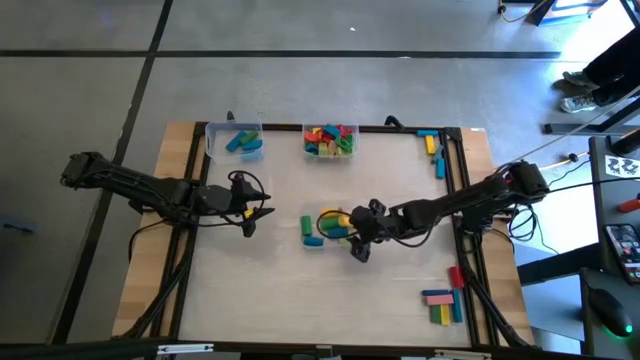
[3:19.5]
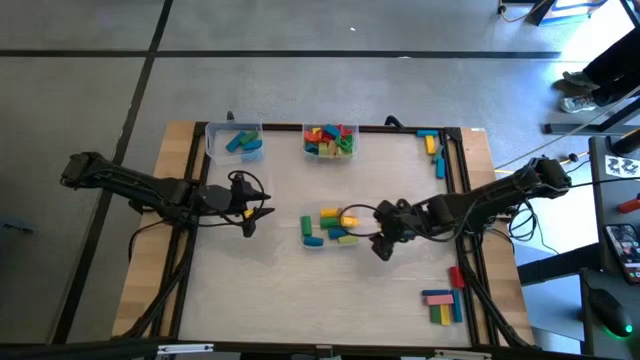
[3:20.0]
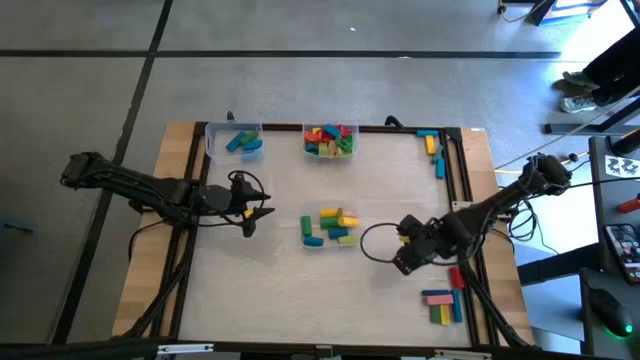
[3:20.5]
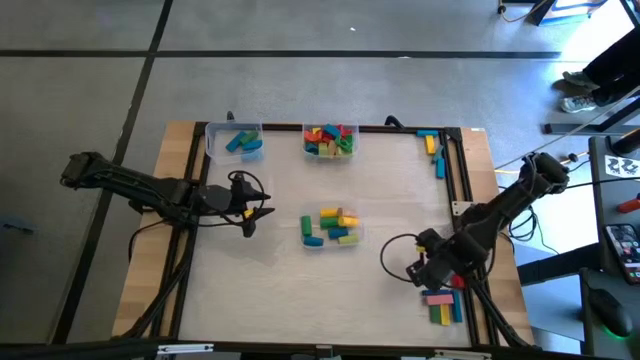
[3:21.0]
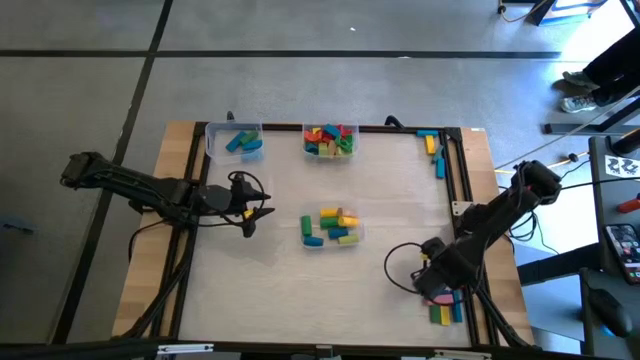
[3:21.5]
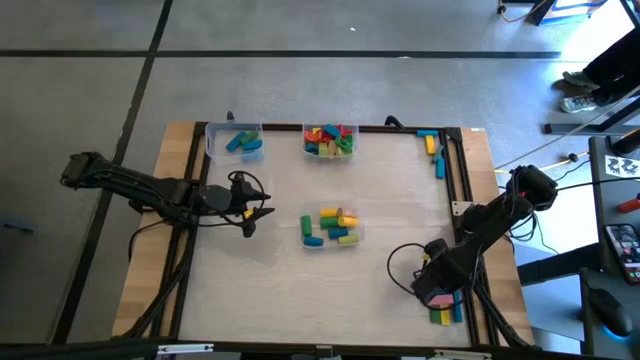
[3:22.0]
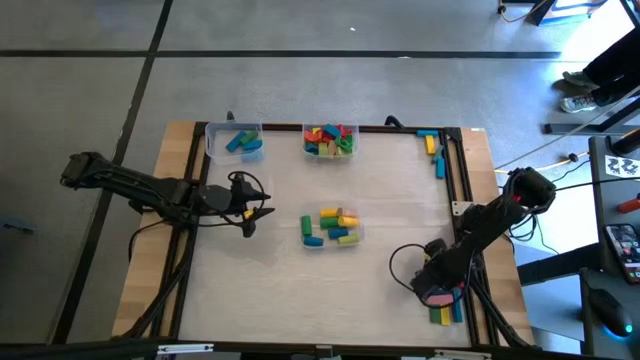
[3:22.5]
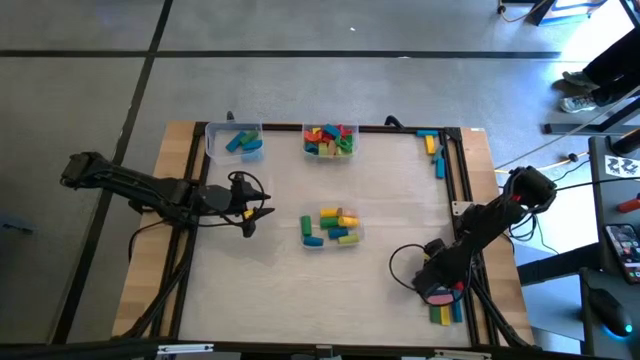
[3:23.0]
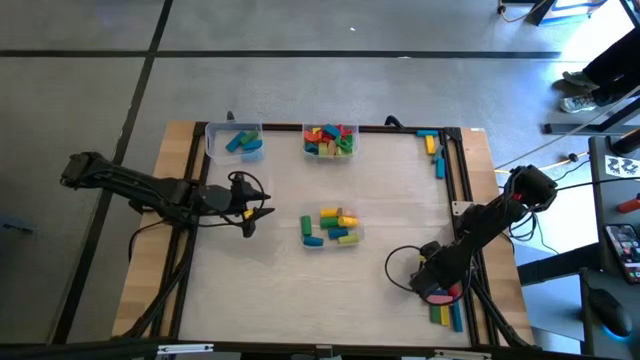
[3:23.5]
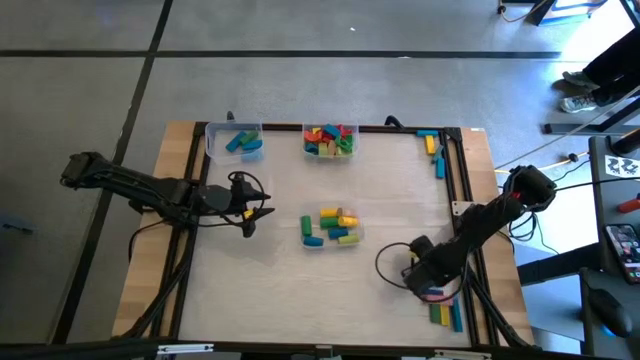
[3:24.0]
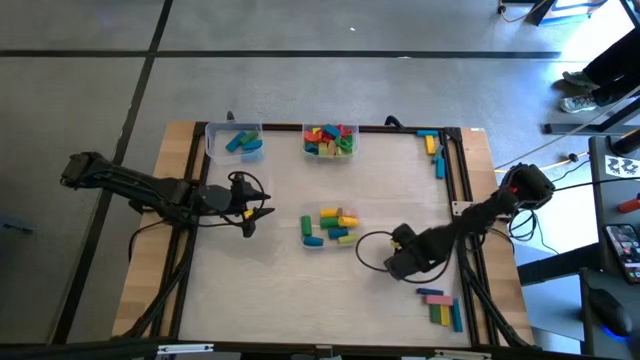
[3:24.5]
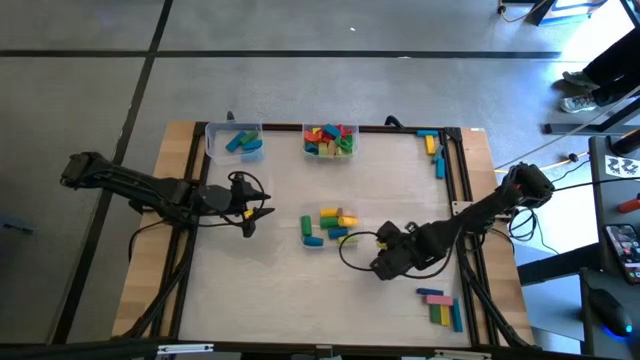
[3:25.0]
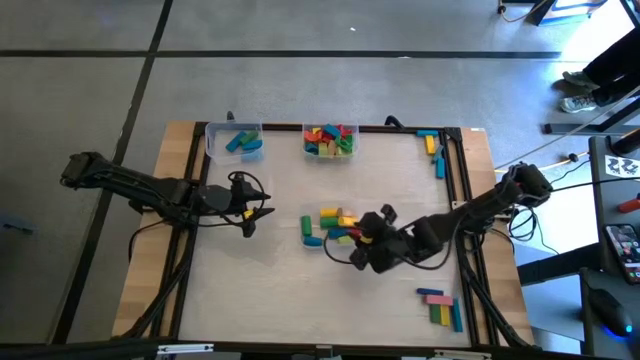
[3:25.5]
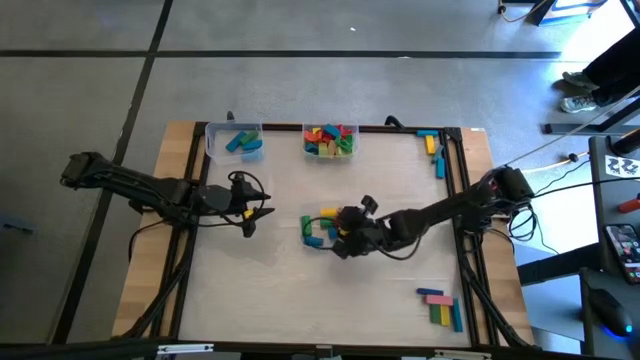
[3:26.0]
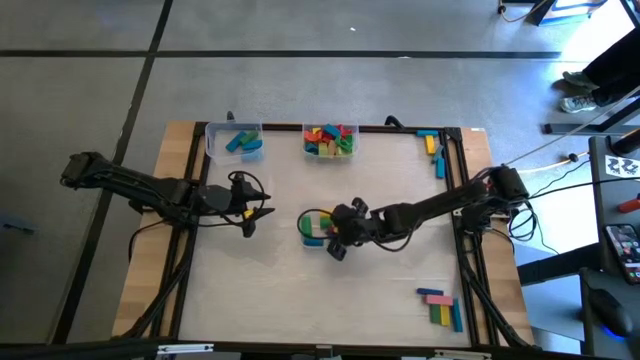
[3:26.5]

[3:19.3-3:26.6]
Task: Sort blocks by size
Put the red cylindrical block into the bottom transparent bin

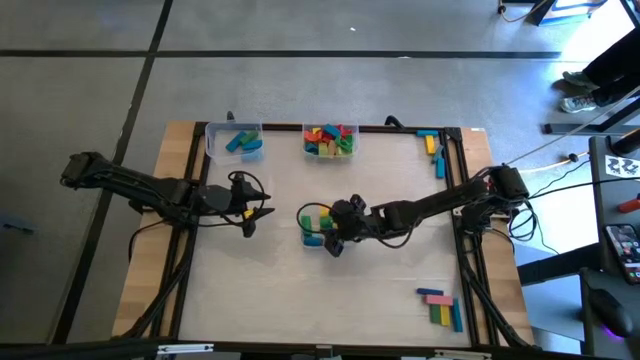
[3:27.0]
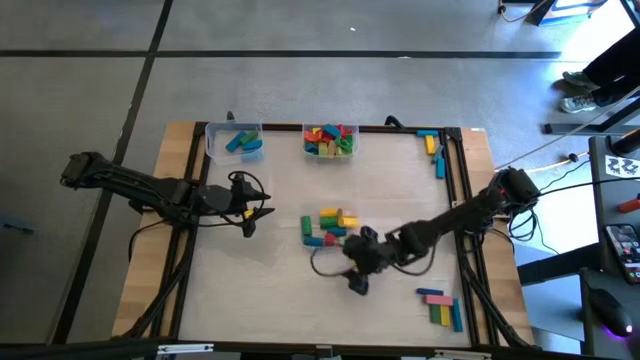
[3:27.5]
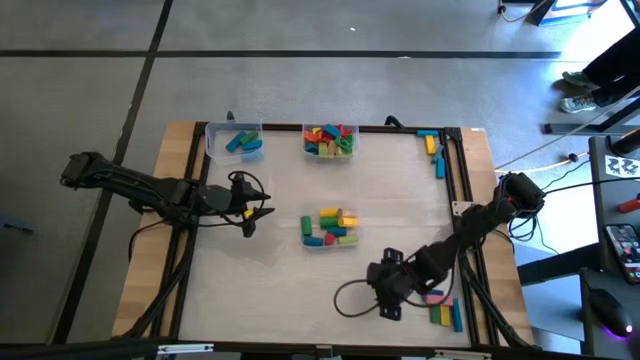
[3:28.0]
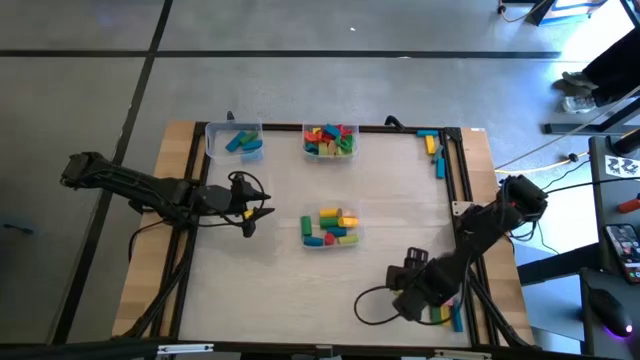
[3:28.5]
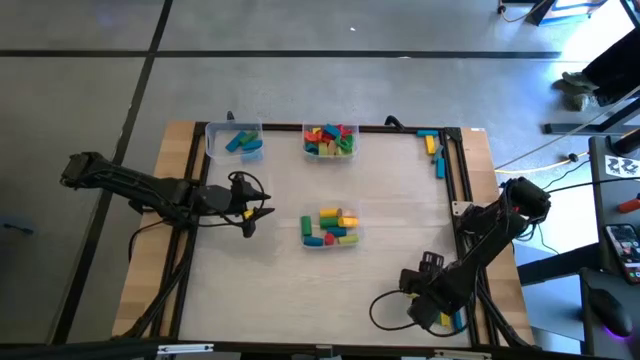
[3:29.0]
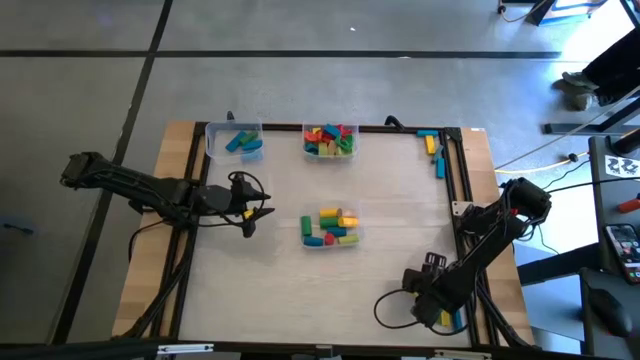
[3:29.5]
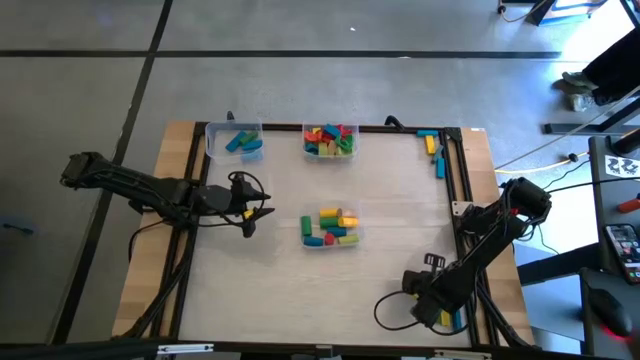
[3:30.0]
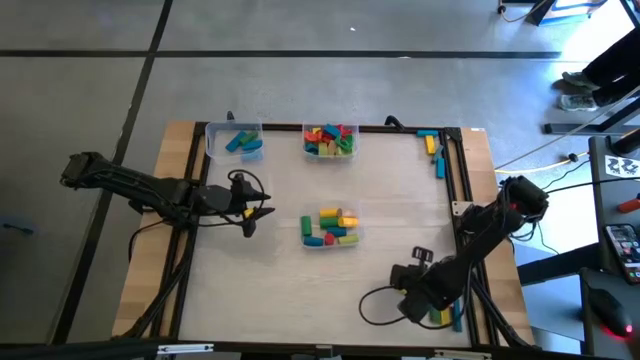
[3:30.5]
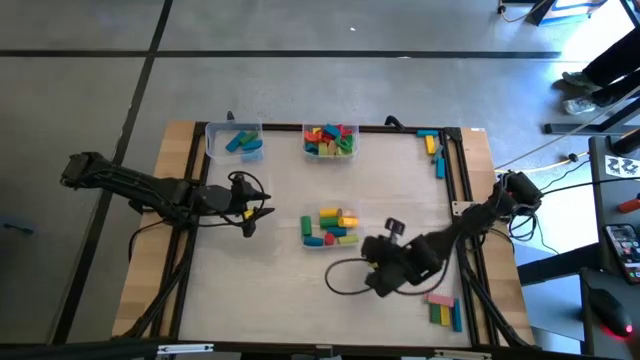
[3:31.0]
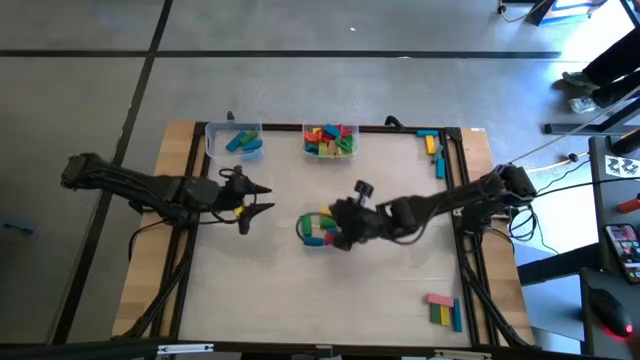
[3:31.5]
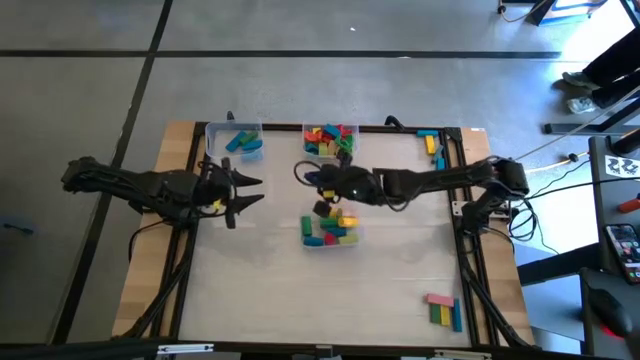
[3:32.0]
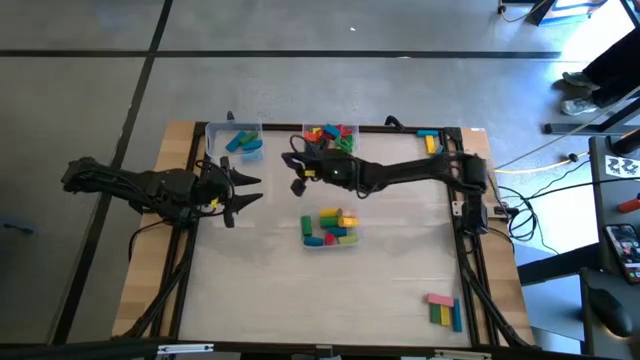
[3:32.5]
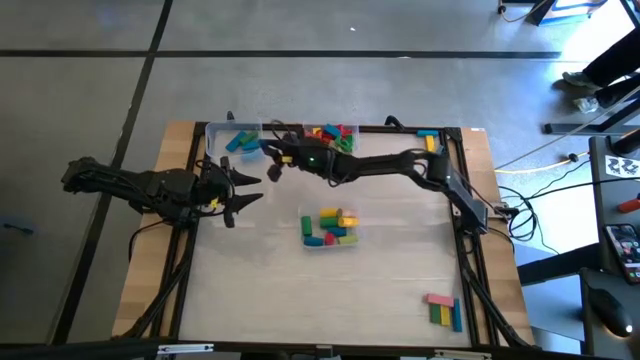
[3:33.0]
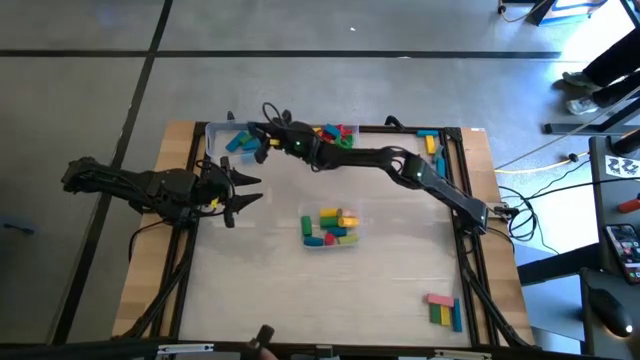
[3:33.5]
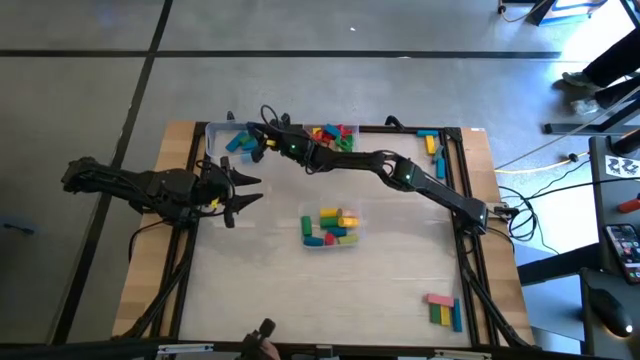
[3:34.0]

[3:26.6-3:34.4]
Put the blue rectangular block into the top left transparent bin

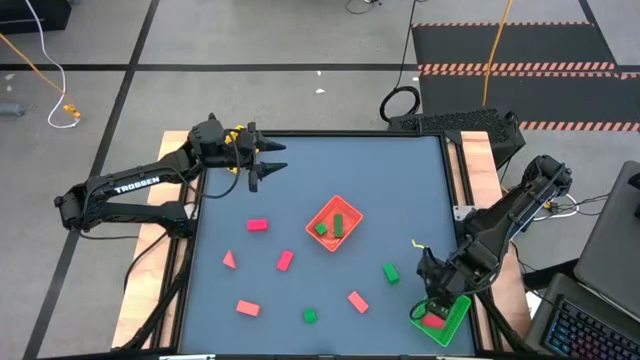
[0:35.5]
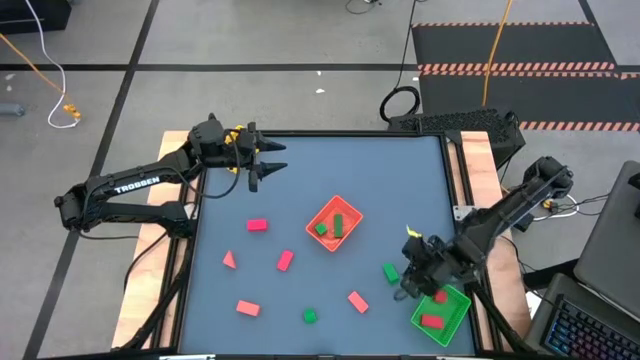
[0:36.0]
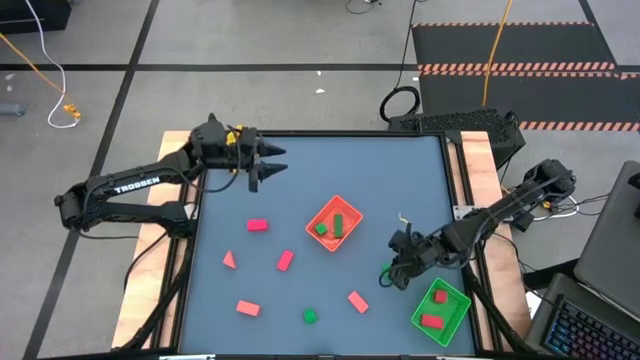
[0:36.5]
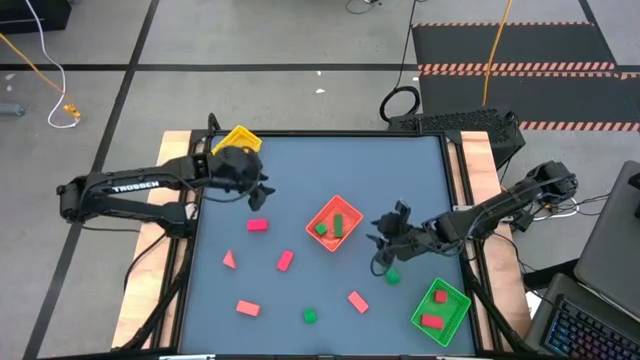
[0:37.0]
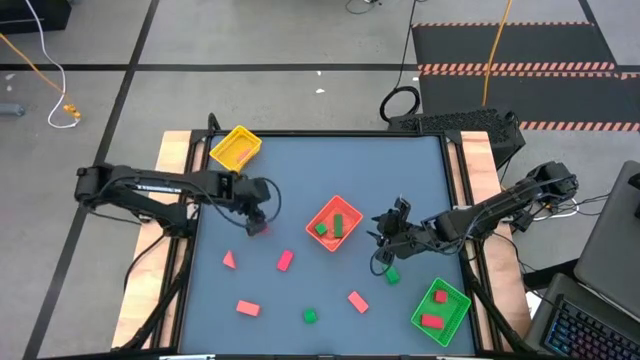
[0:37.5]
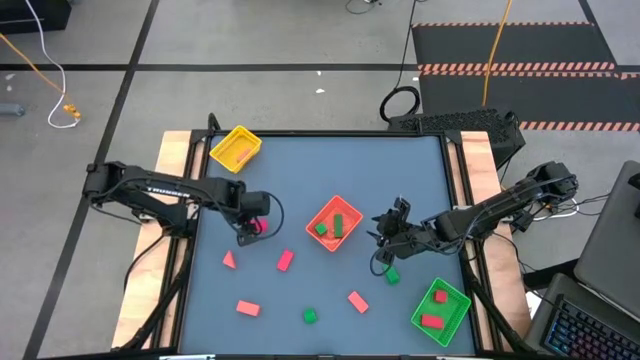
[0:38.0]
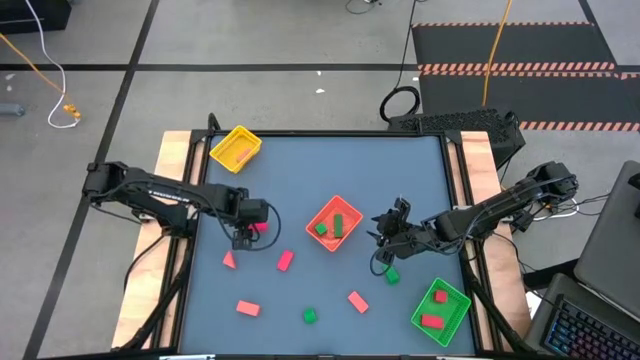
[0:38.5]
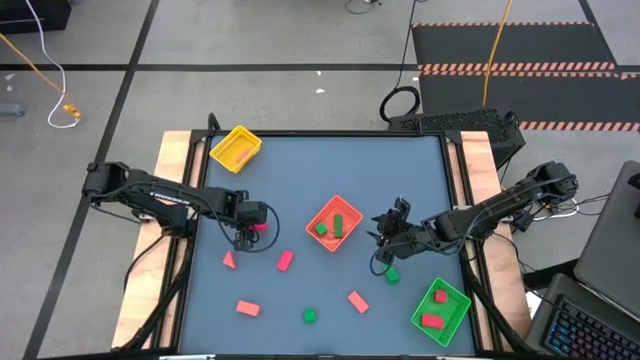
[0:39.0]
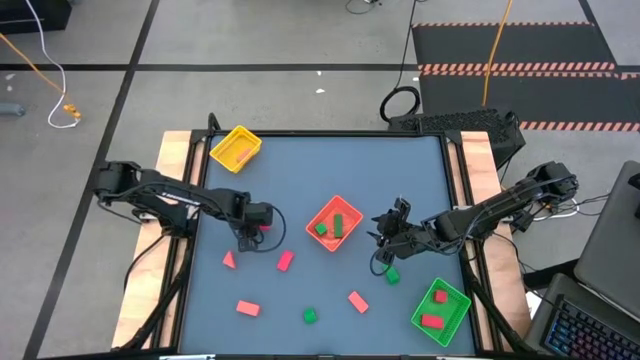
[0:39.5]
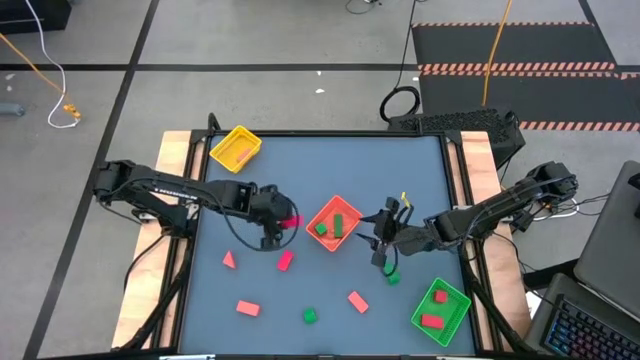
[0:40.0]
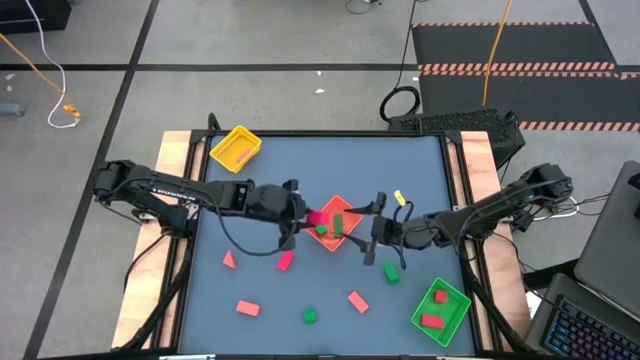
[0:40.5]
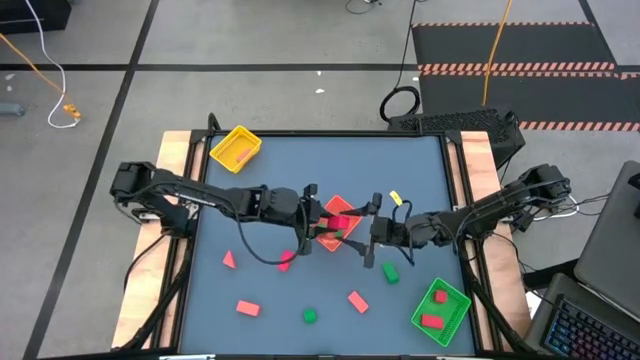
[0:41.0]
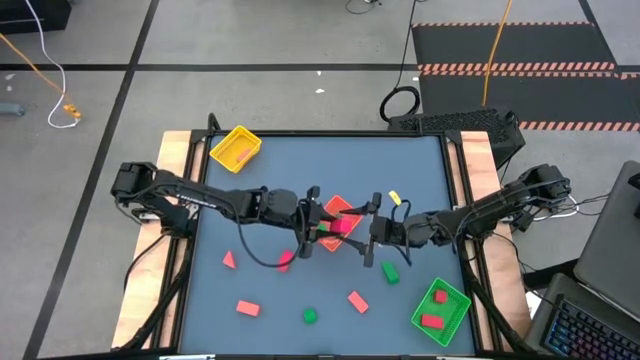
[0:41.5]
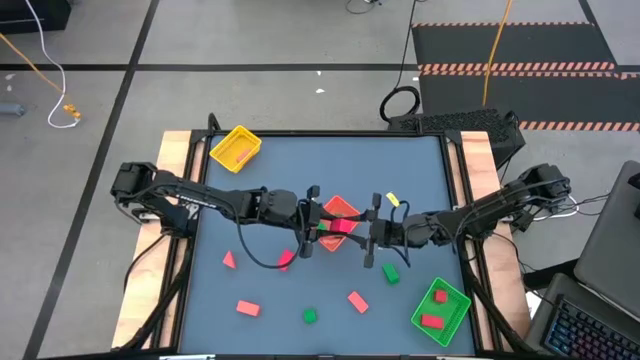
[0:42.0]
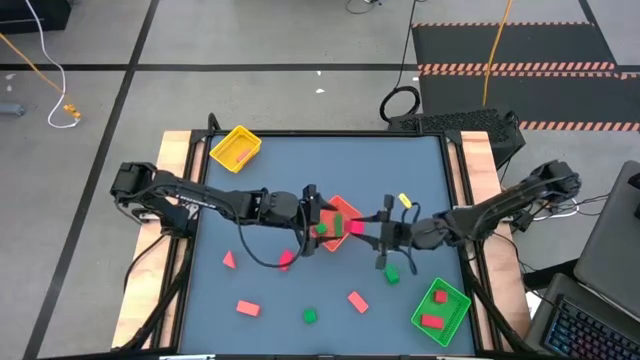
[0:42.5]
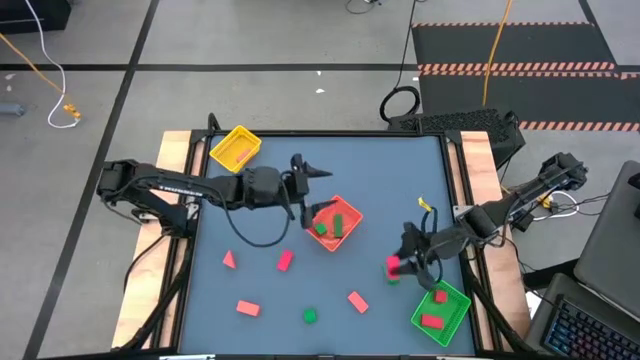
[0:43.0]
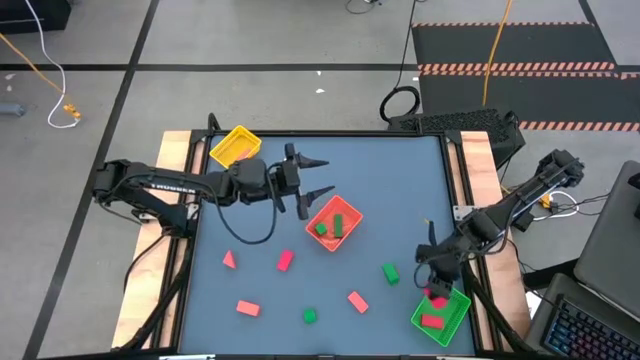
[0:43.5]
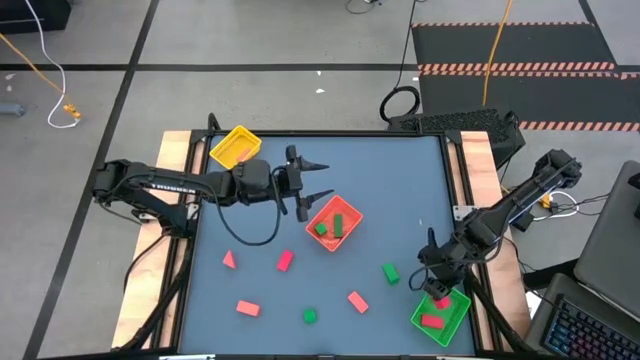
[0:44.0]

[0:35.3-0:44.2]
Task: Sort & place blocks by color
Put the red block into the green bin
